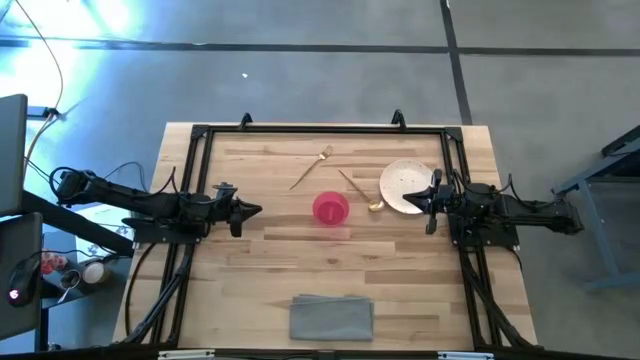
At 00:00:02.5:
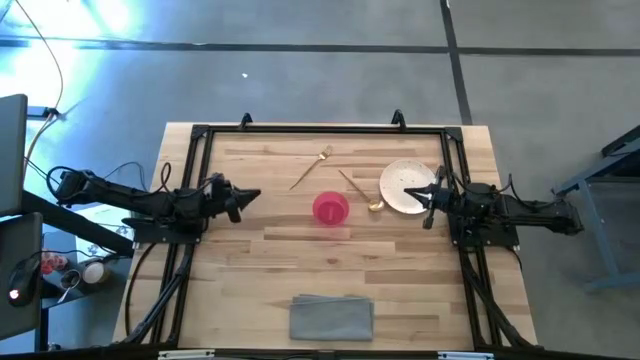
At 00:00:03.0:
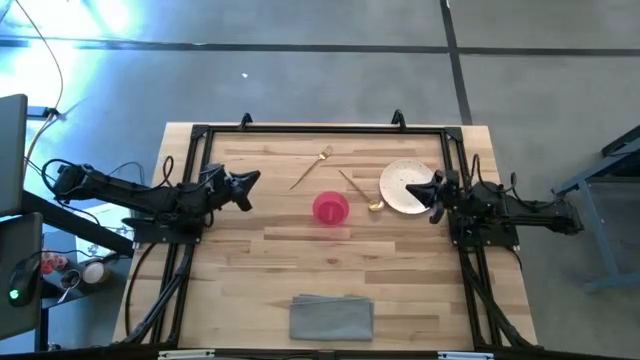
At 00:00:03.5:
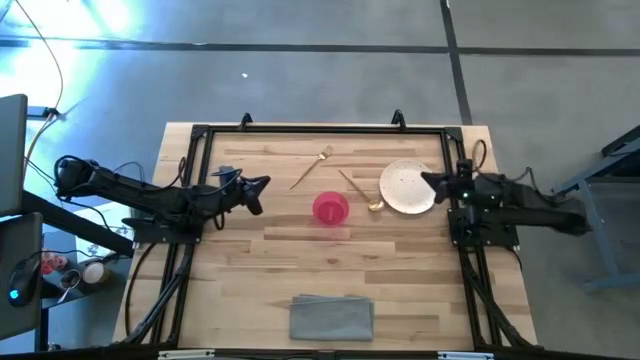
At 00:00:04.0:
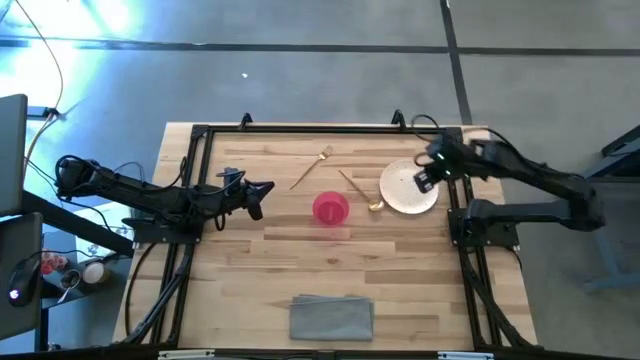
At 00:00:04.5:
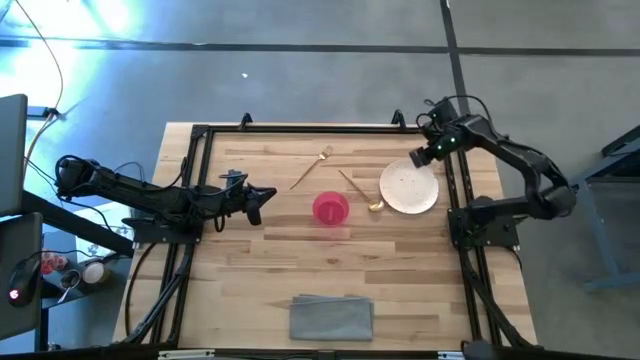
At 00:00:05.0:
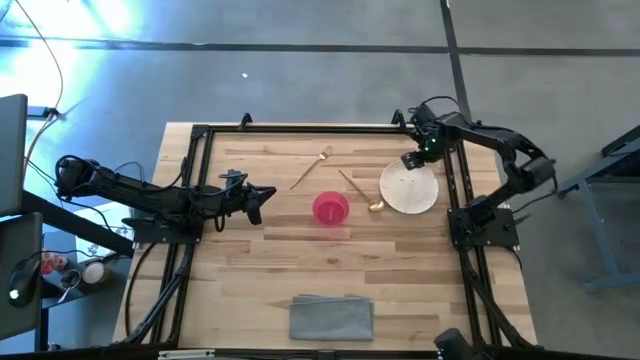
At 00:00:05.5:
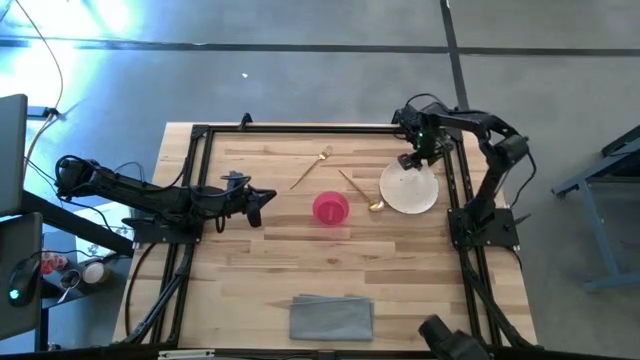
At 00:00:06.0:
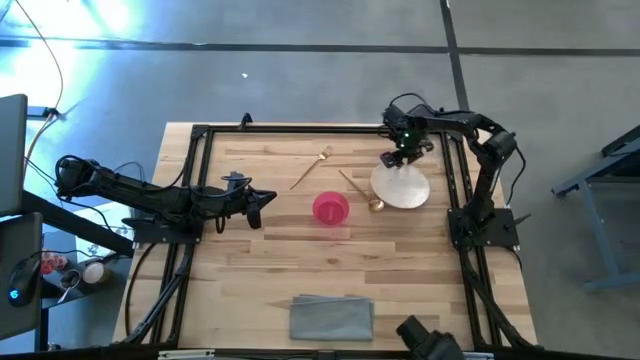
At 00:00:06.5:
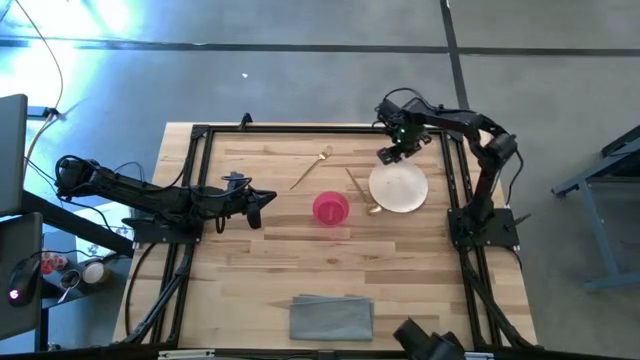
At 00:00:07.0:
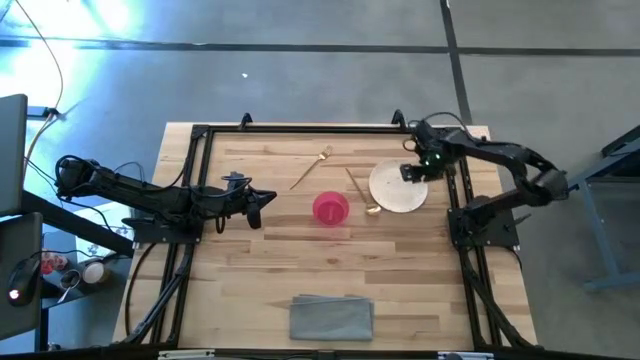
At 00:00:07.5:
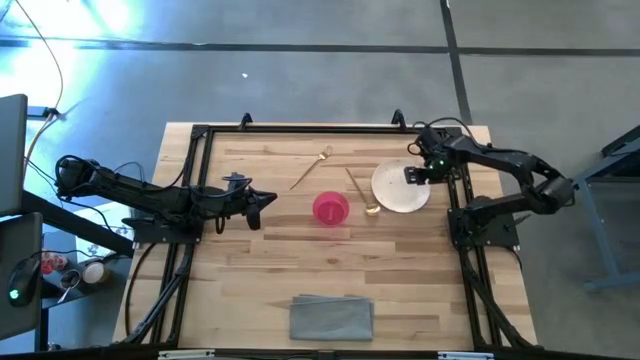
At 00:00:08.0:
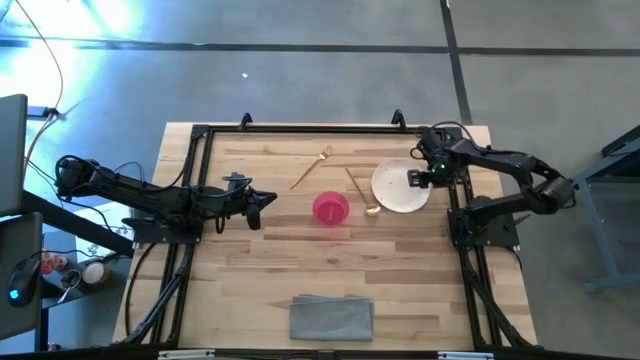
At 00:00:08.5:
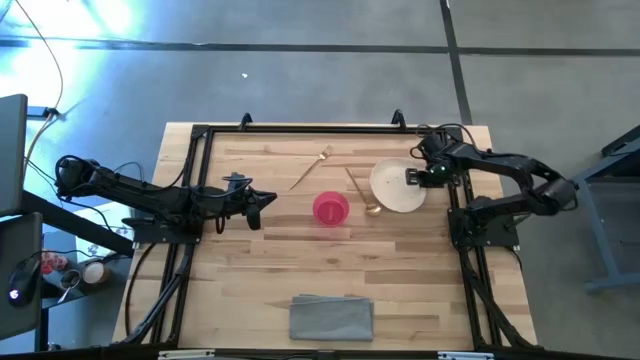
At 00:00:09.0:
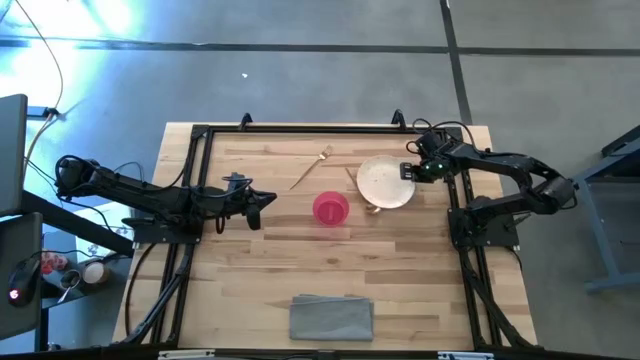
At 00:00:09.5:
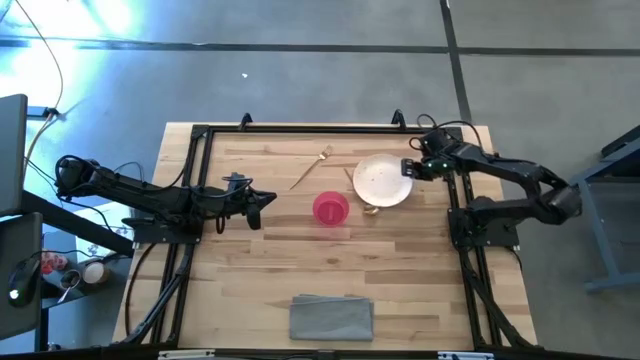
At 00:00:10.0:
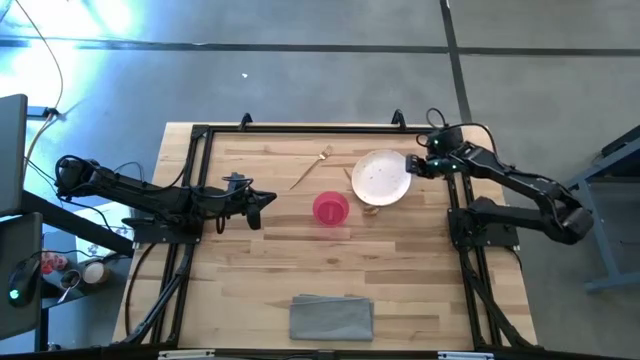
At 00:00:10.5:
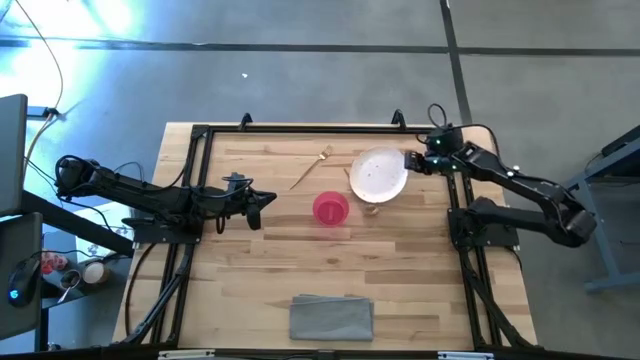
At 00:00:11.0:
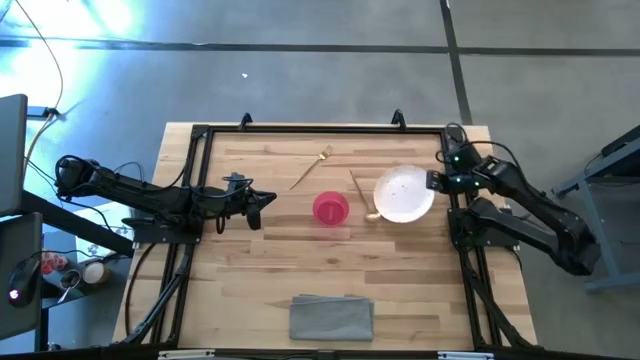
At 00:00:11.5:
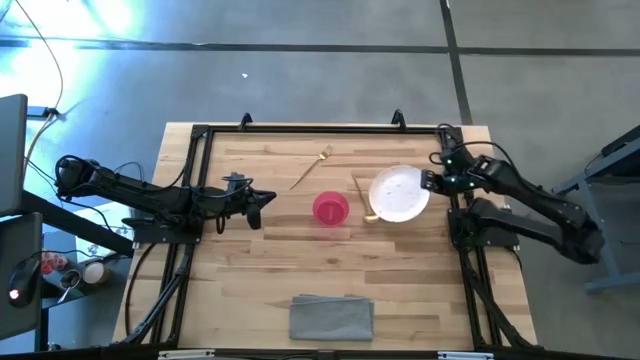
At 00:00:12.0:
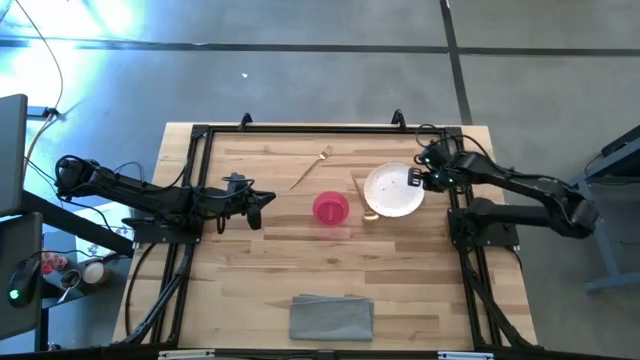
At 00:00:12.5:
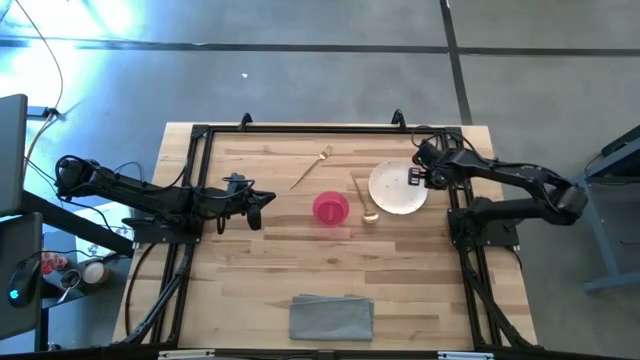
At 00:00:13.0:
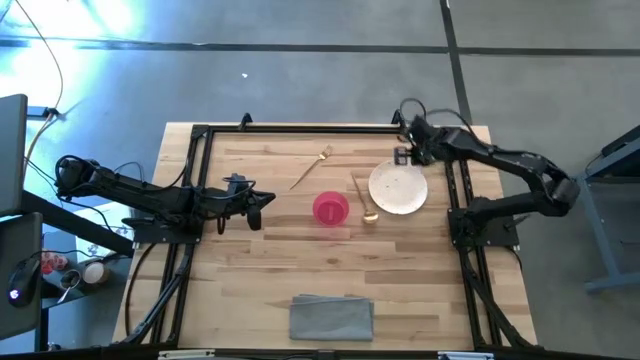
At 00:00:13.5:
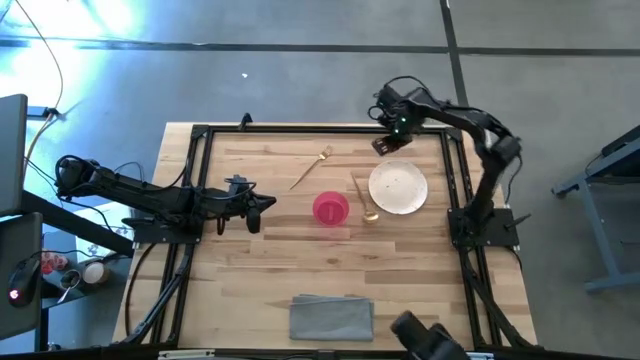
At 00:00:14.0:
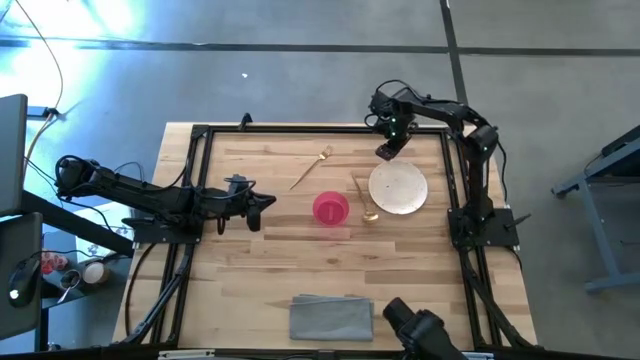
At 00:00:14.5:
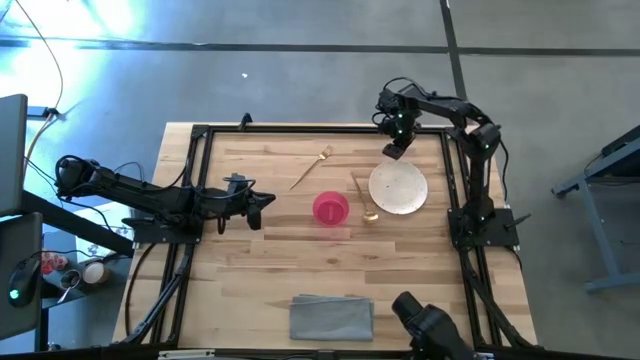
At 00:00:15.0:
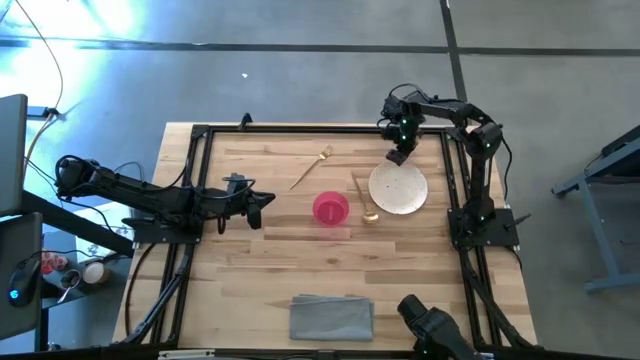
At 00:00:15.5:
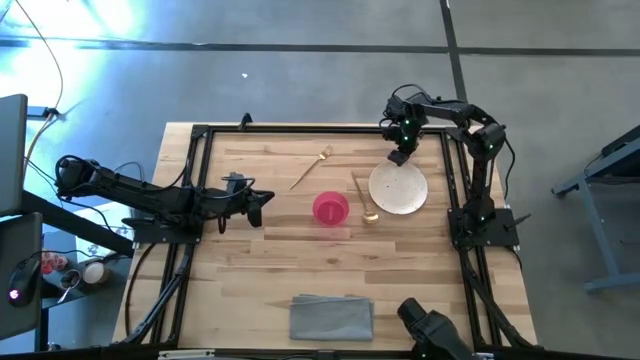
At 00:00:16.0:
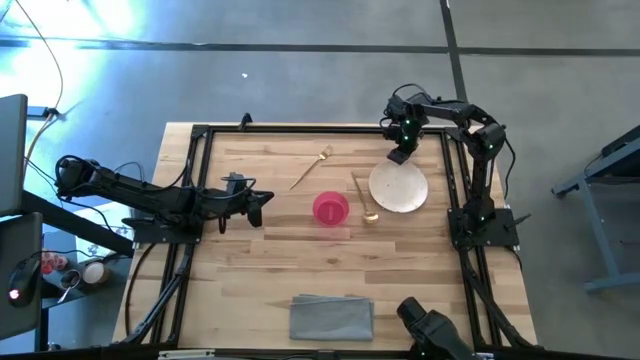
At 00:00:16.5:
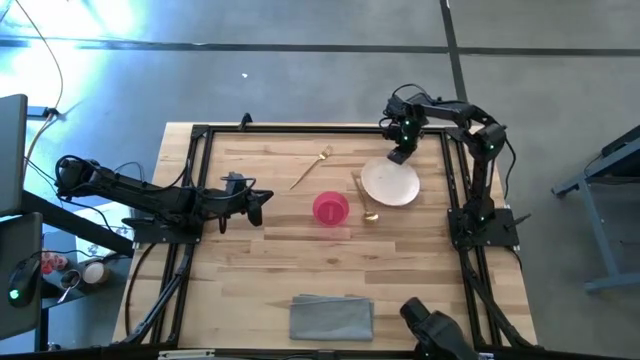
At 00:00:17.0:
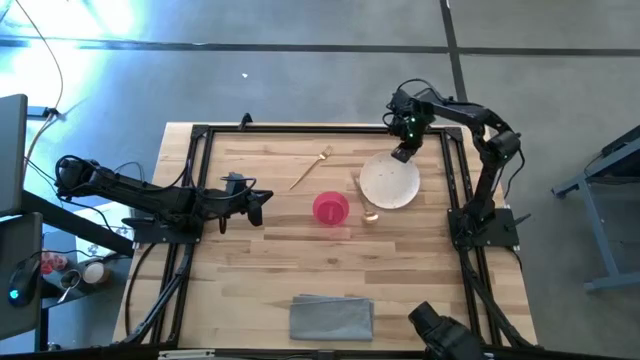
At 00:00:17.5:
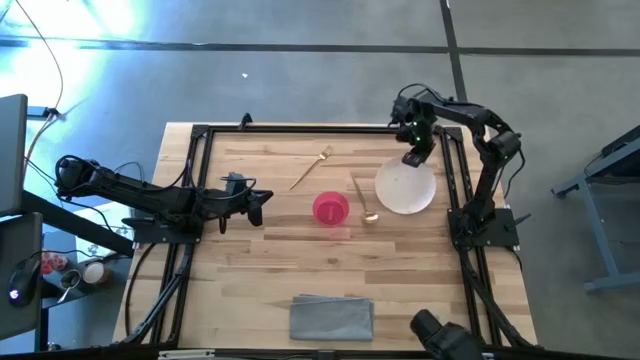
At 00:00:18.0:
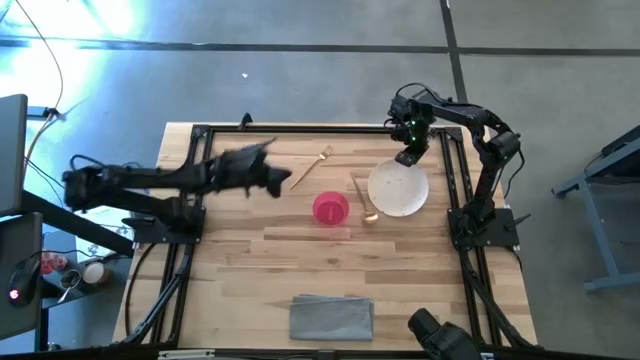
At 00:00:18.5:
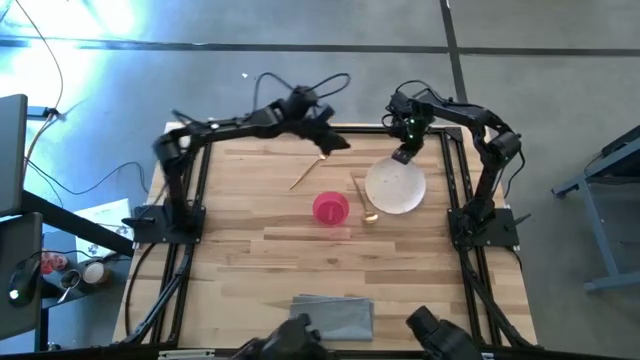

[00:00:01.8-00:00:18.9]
Task: Set table place
Move the white plate to the middle
